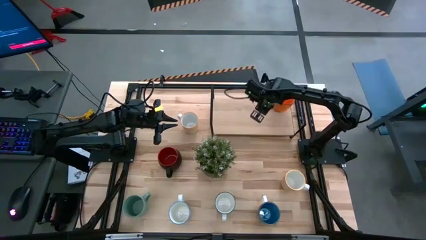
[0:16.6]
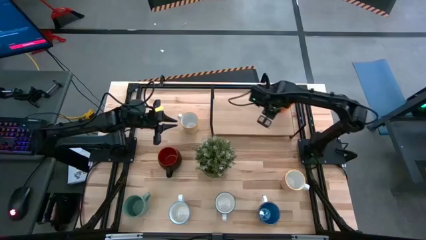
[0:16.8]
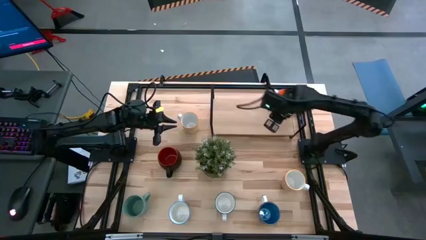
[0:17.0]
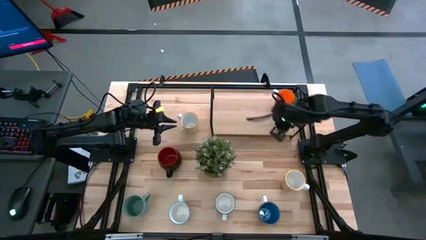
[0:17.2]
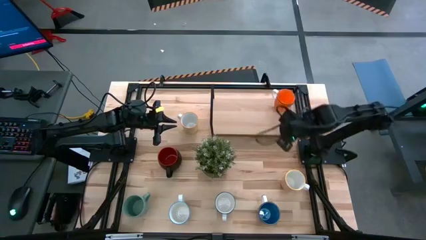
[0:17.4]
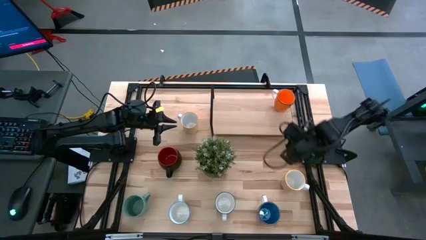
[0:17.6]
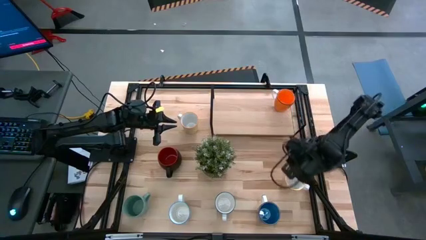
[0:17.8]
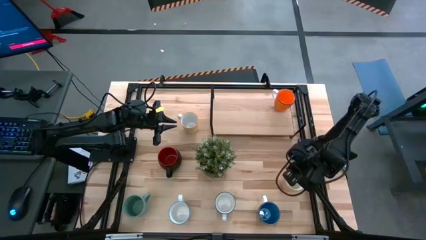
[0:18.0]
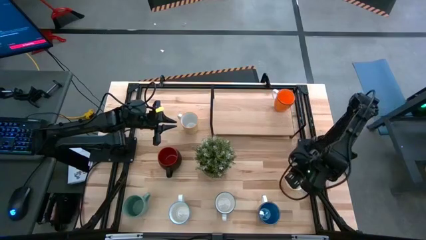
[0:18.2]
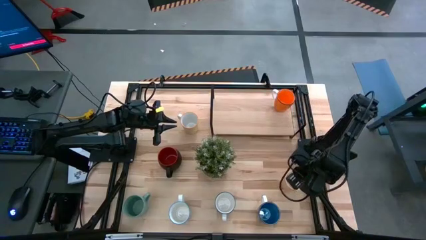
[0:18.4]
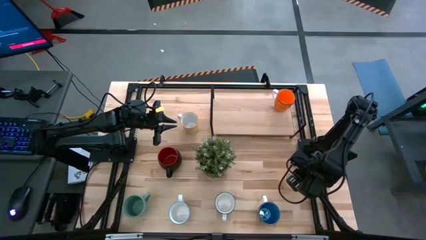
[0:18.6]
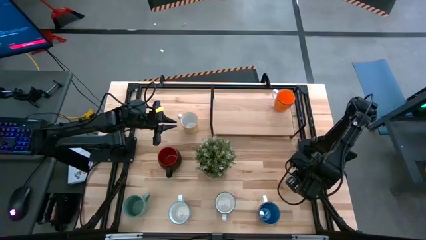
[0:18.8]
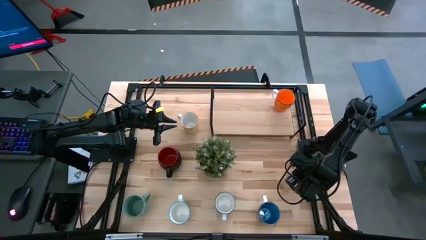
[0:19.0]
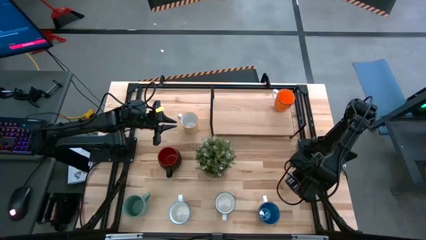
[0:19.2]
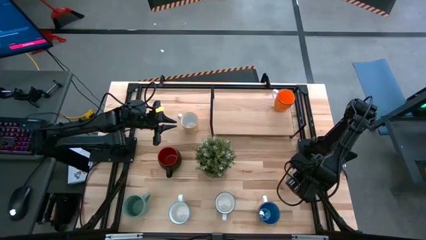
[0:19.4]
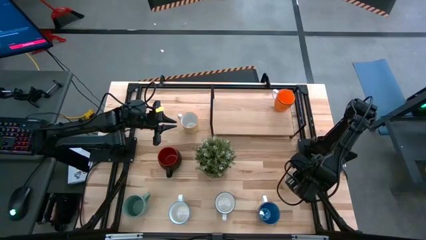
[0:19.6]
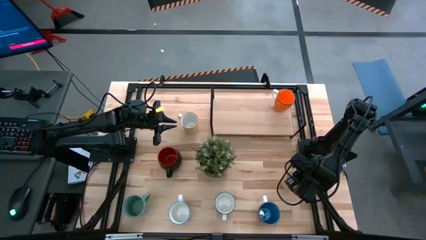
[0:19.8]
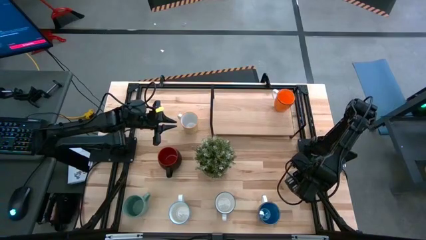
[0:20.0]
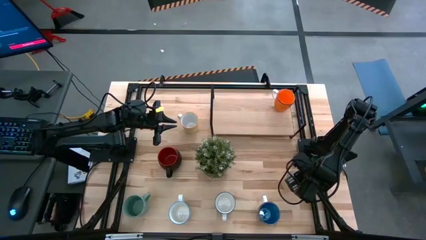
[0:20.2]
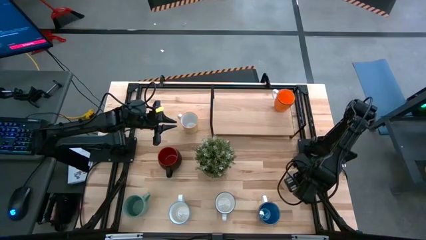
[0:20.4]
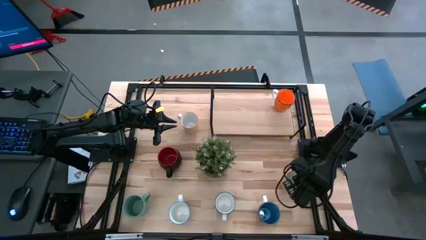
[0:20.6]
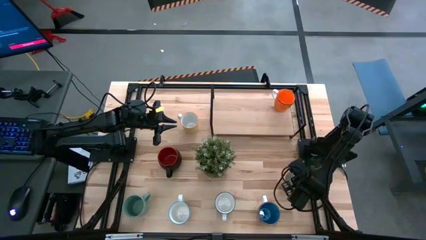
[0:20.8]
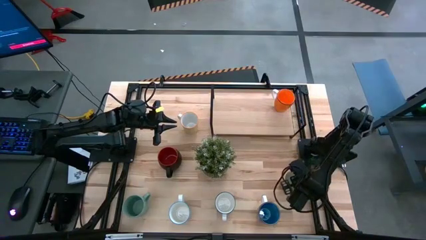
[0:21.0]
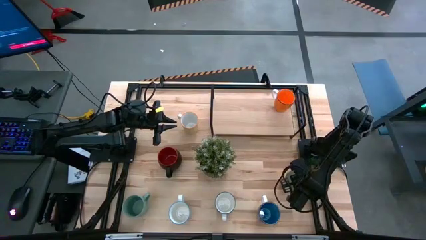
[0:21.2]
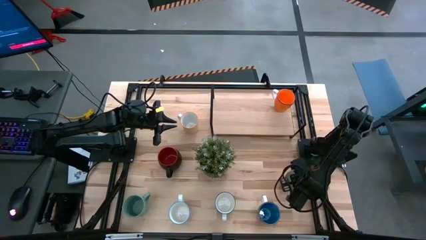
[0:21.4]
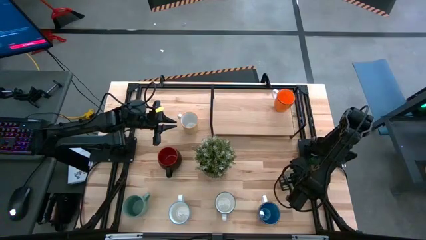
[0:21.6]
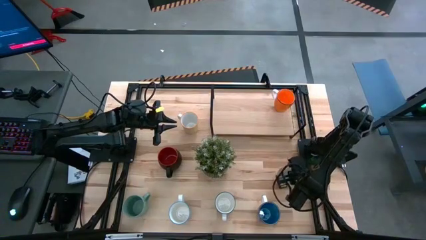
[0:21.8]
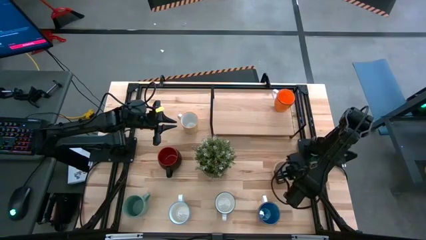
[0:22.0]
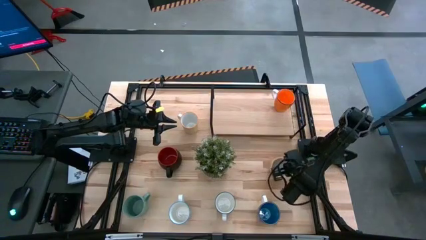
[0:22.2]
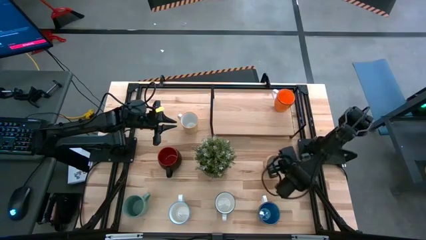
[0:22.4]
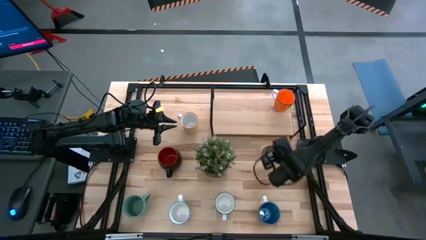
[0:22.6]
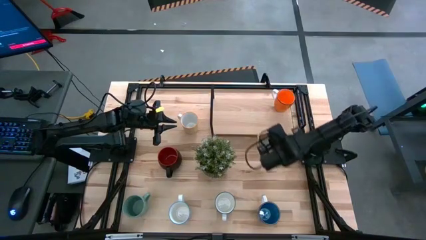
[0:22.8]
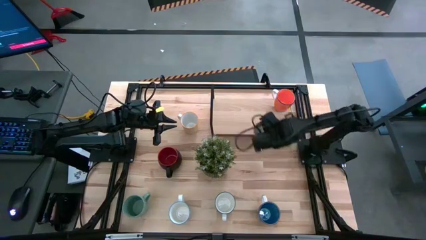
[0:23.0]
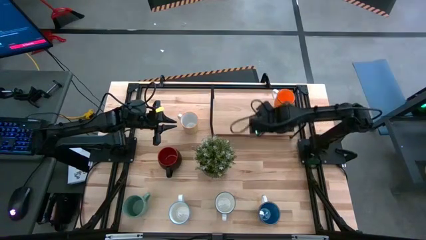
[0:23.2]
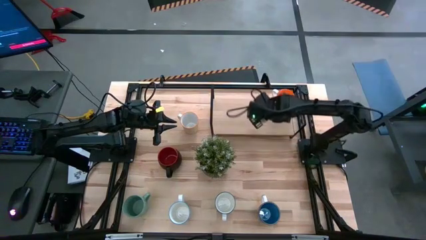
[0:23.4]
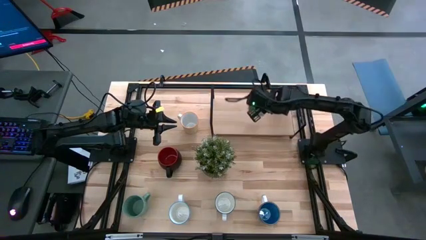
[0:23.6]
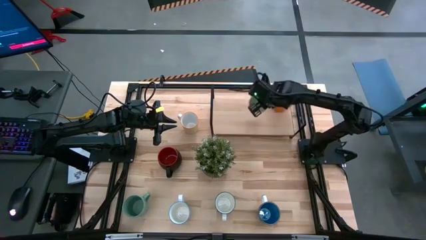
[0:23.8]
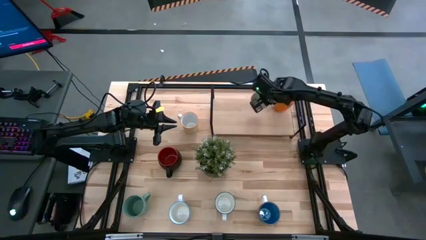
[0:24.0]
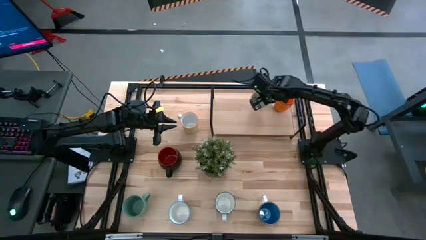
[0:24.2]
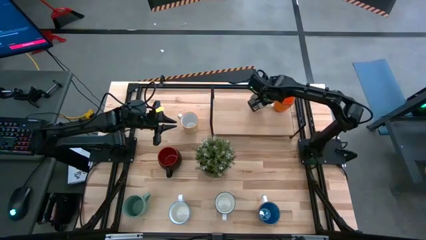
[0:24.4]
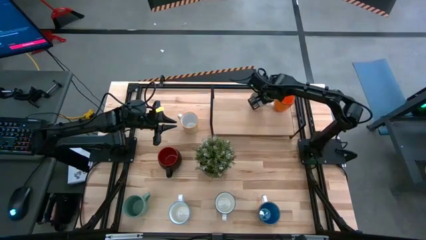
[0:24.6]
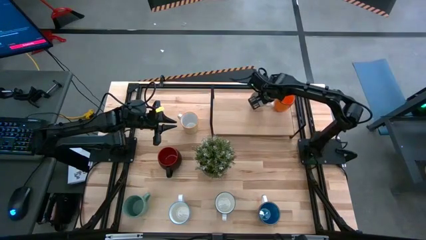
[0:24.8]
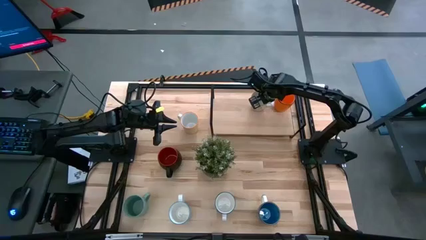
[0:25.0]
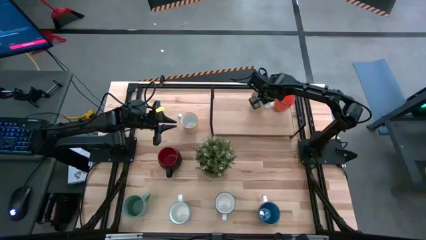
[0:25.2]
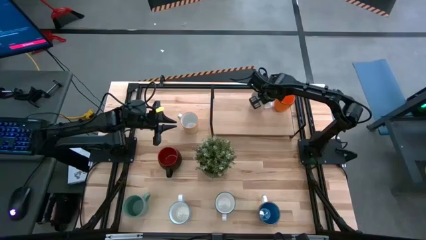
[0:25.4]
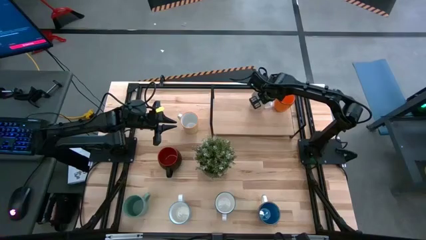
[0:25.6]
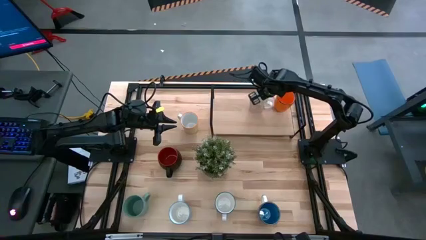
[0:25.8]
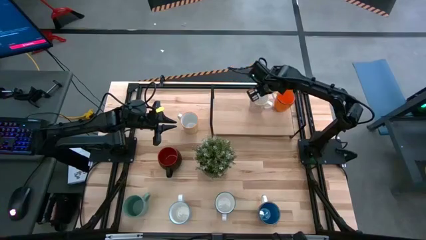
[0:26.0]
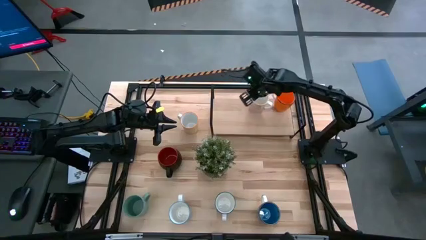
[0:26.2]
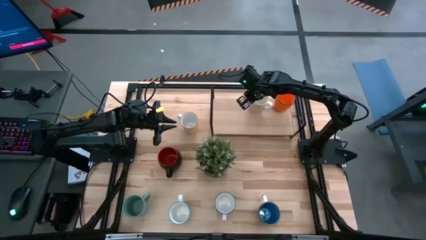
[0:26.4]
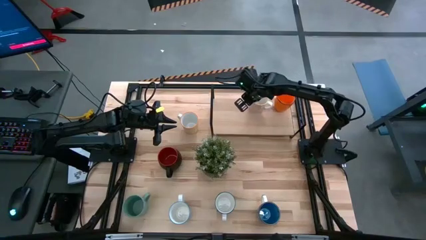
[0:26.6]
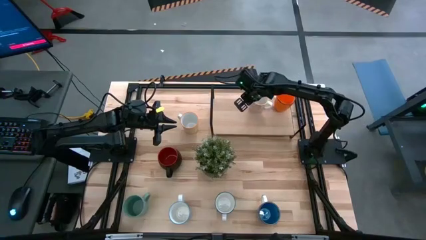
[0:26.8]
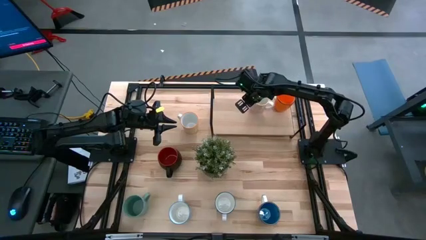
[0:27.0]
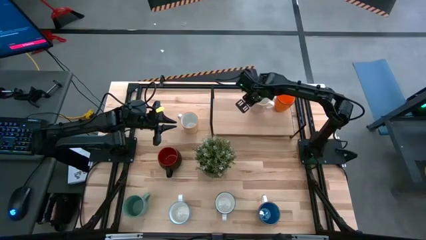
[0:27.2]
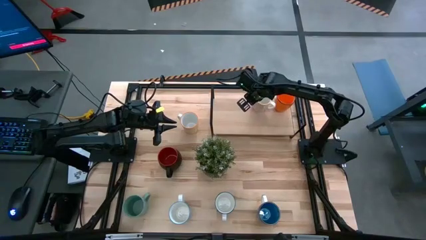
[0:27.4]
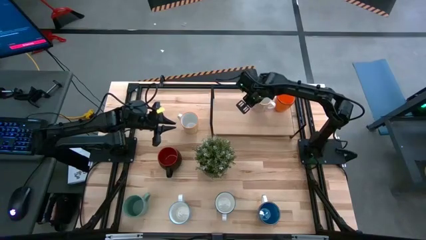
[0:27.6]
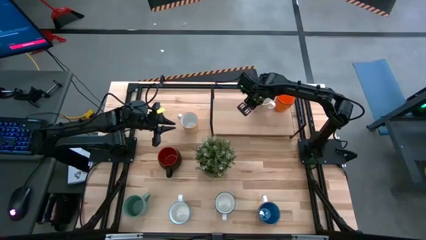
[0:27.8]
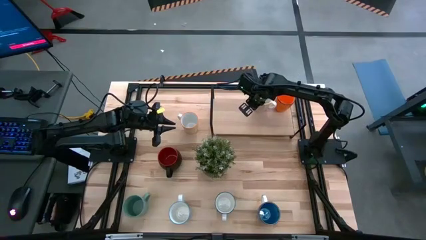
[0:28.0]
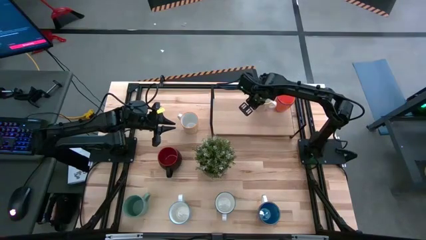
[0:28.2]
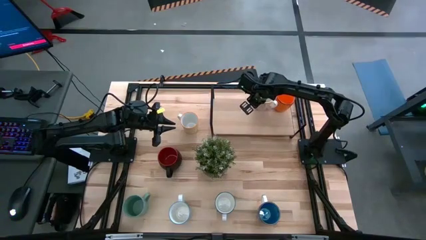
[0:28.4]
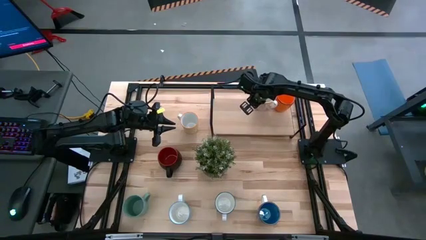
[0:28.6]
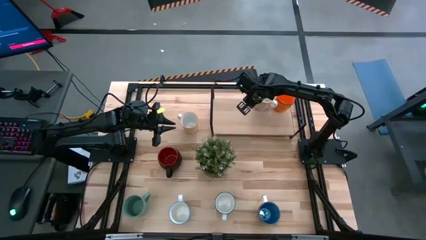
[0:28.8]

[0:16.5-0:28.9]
Task: Place coffee mugs
Put the orange patterned mug on the shelf
